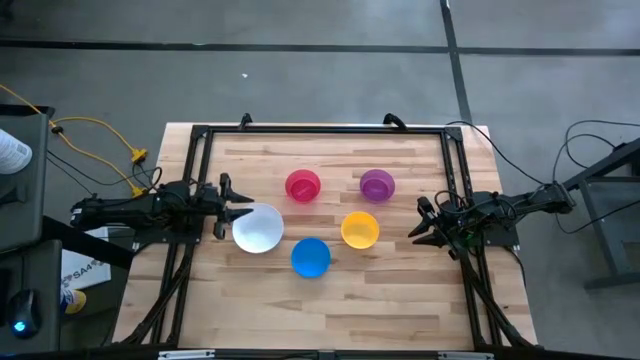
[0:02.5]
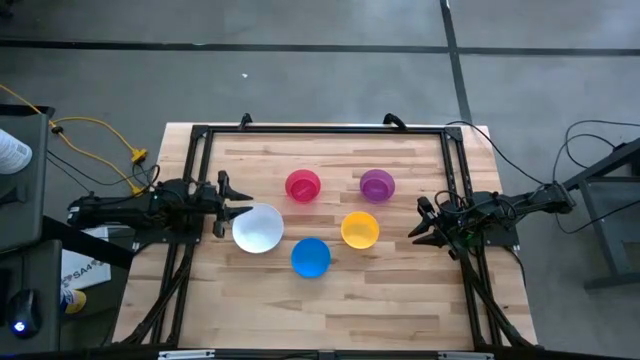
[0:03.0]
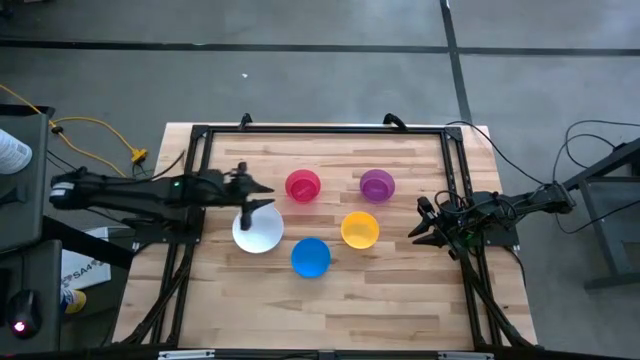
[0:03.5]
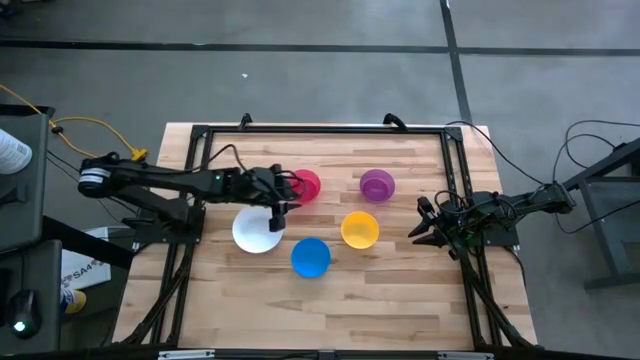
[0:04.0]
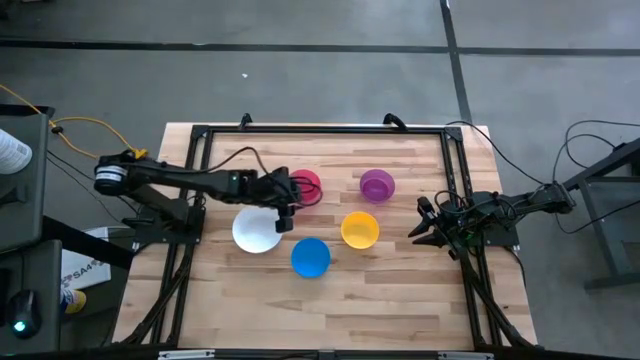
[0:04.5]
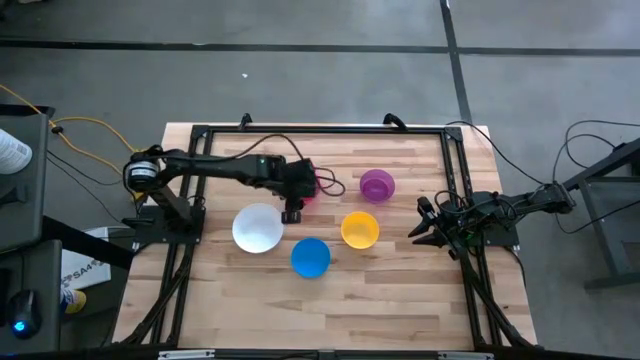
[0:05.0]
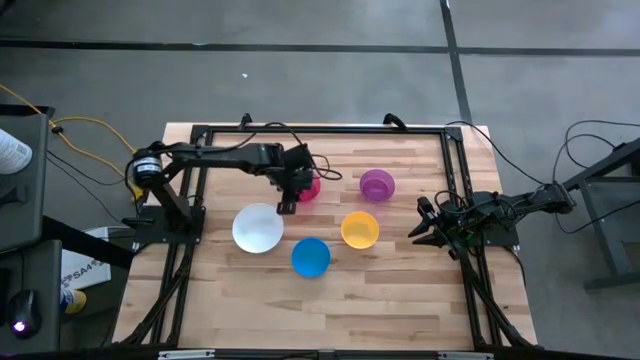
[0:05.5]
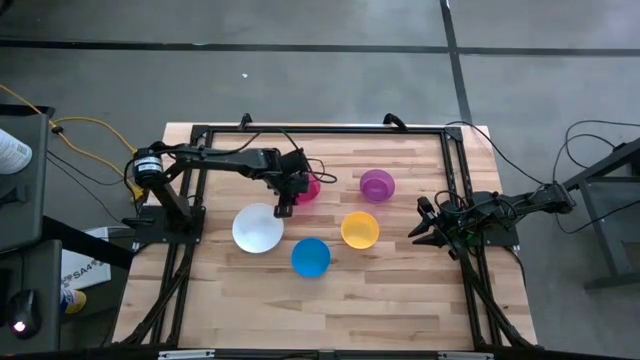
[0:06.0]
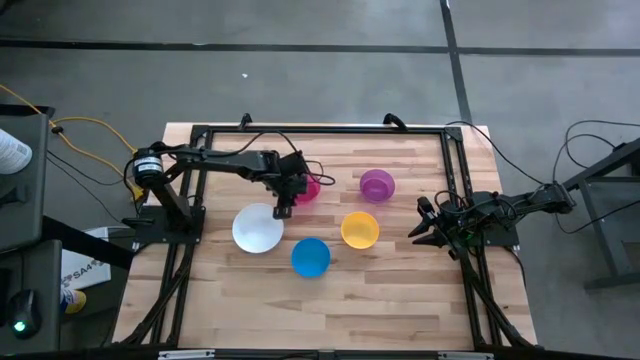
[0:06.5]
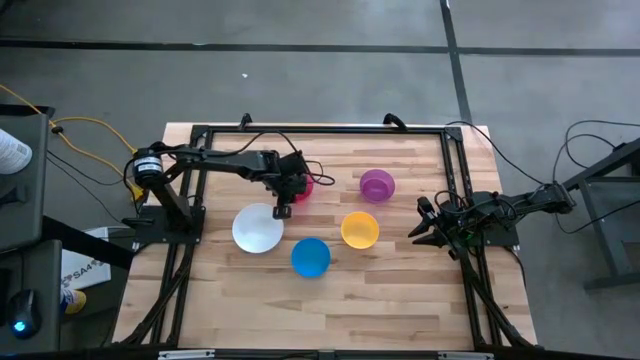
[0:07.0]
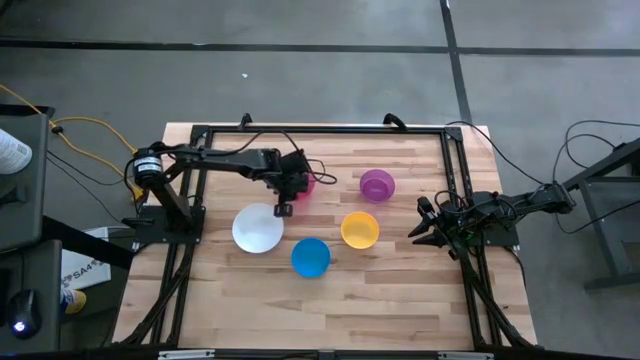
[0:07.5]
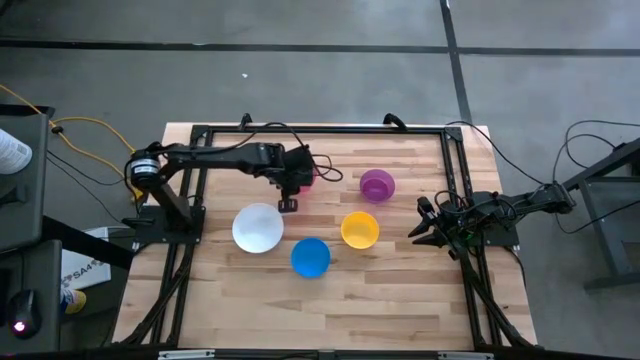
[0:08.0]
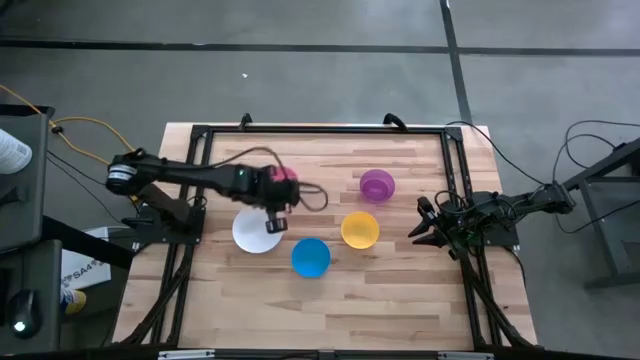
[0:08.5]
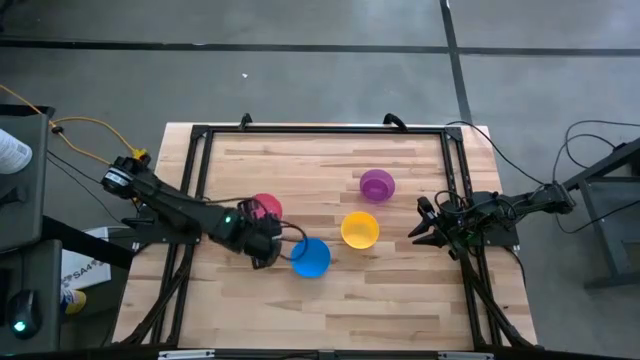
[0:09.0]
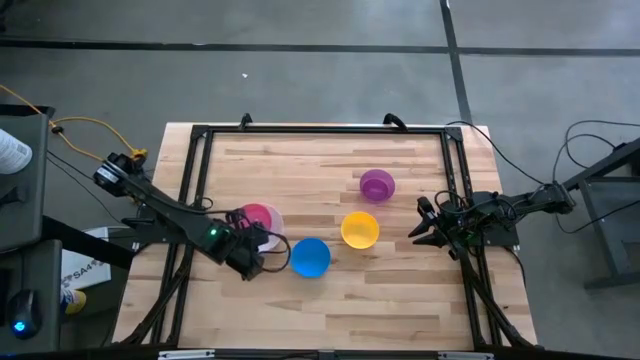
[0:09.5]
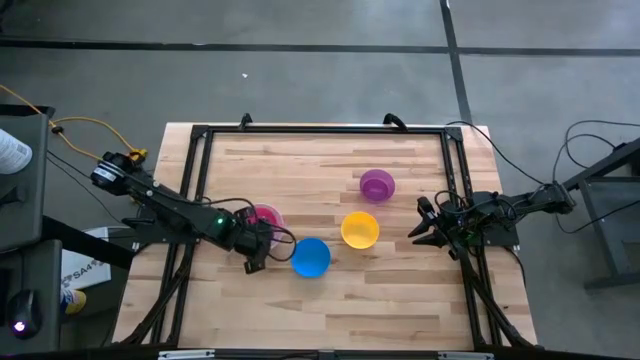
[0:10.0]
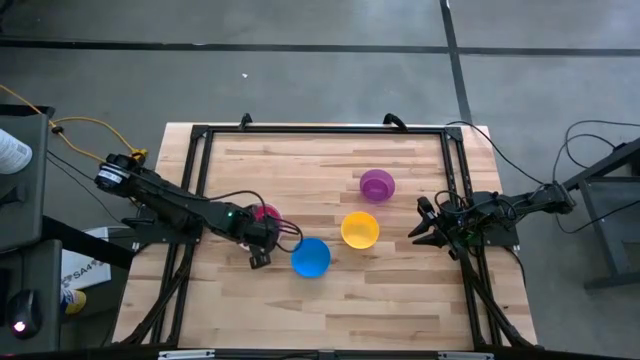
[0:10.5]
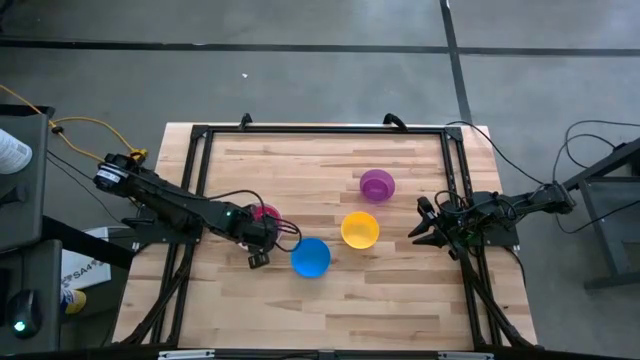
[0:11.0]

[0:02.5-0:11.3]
Stack the pink bowl on the white bowl

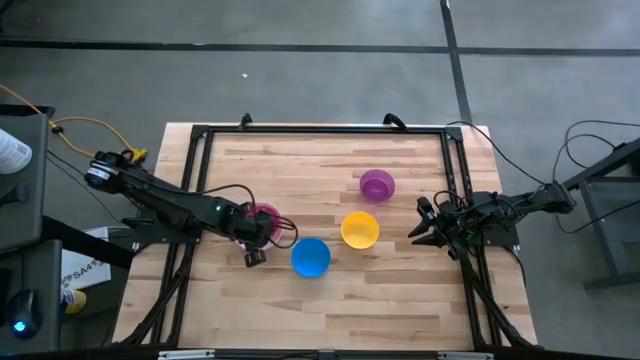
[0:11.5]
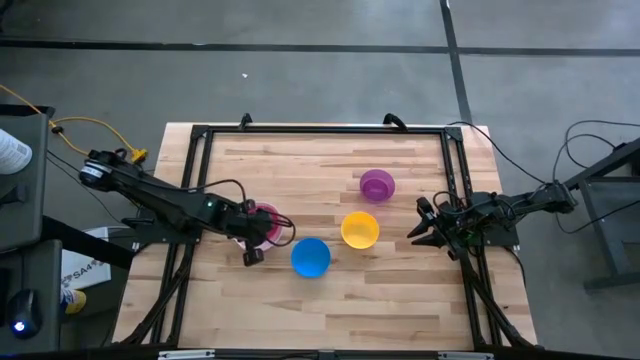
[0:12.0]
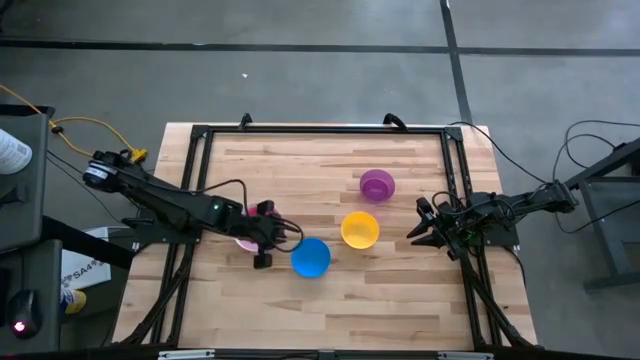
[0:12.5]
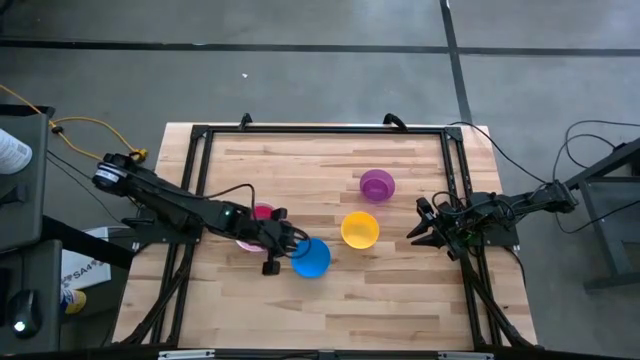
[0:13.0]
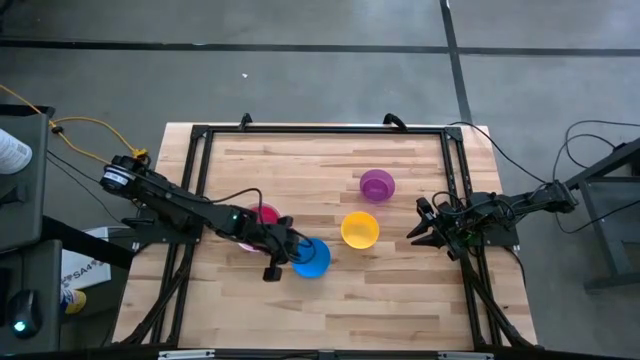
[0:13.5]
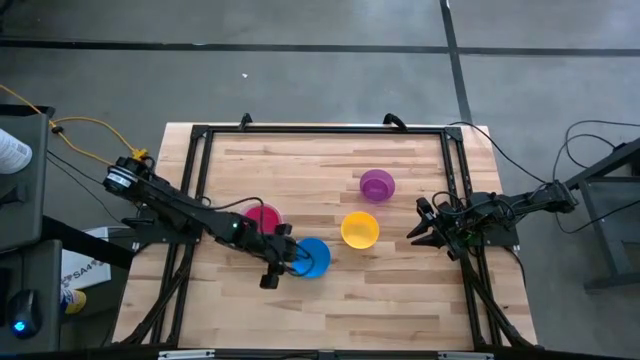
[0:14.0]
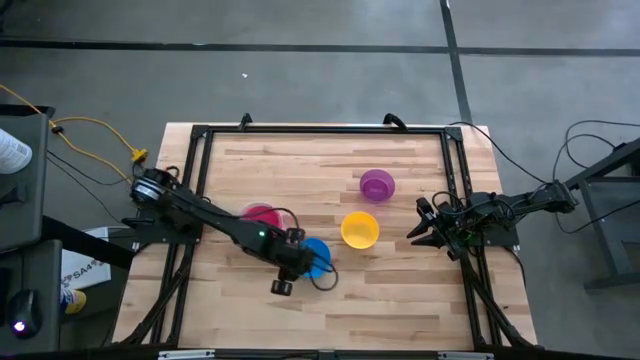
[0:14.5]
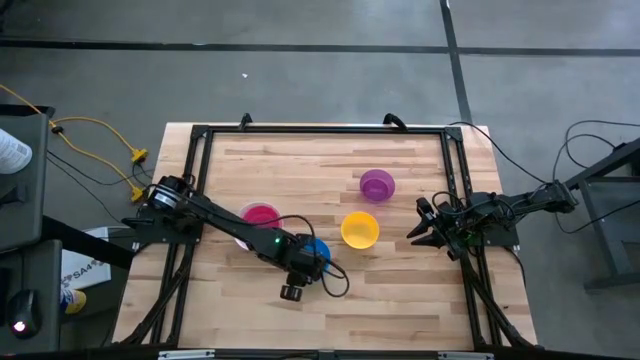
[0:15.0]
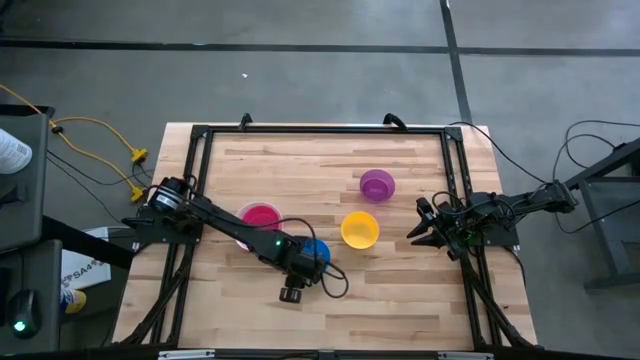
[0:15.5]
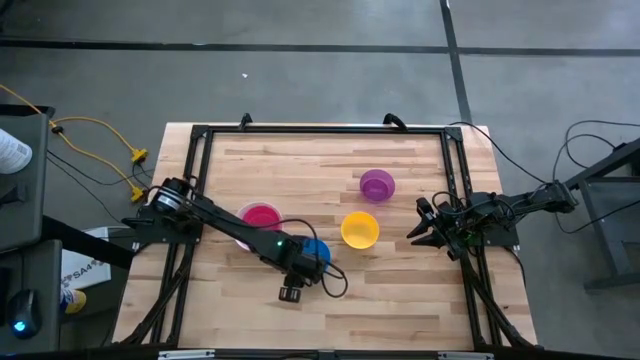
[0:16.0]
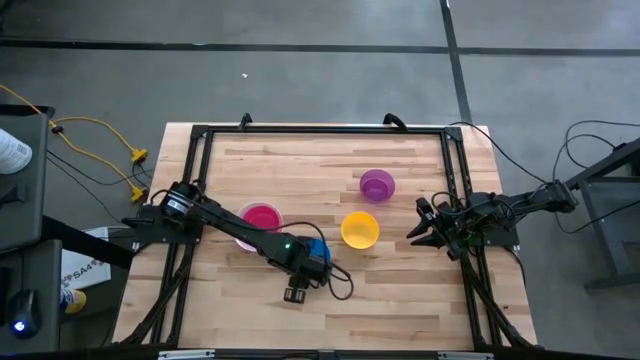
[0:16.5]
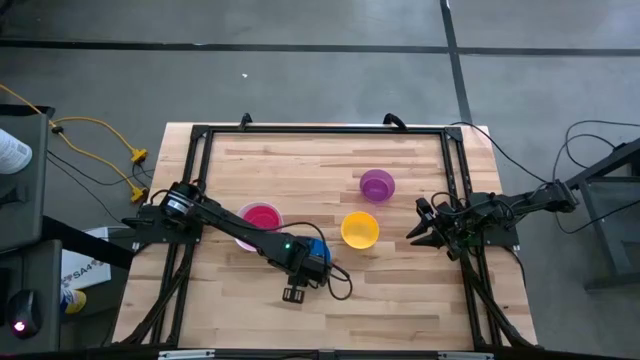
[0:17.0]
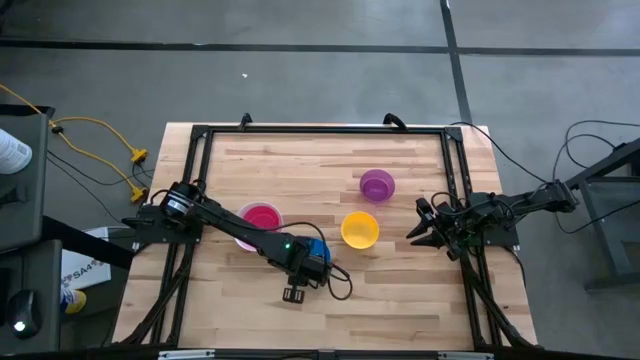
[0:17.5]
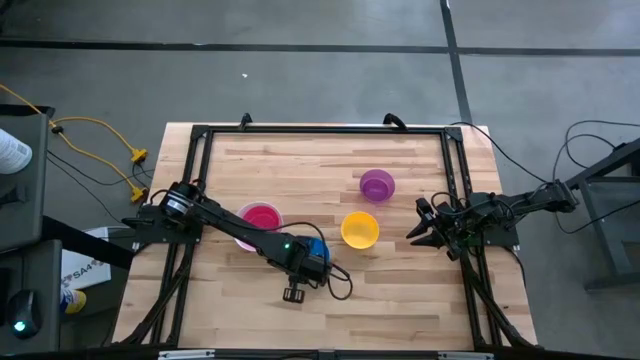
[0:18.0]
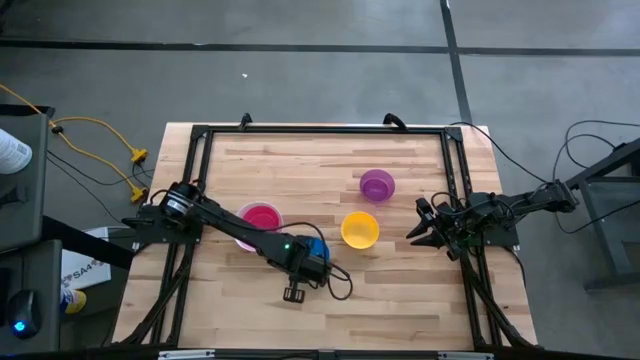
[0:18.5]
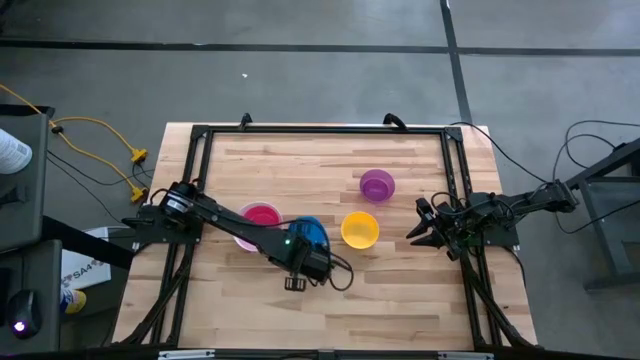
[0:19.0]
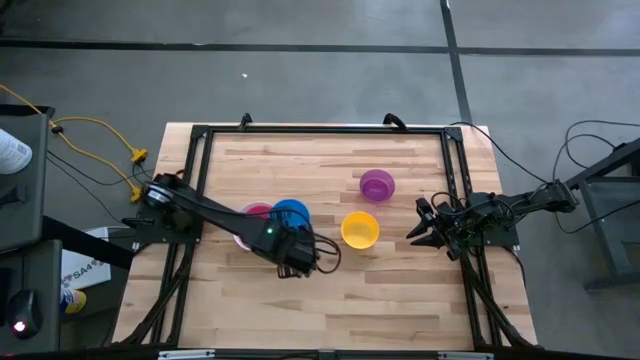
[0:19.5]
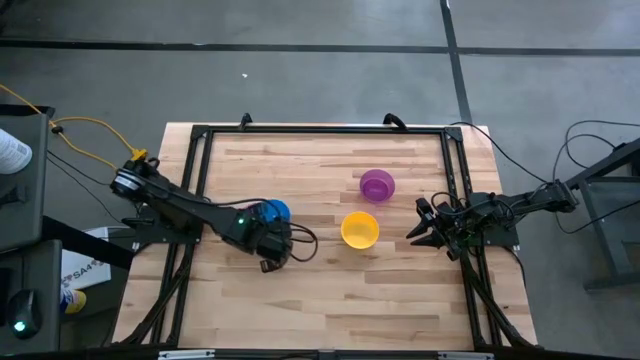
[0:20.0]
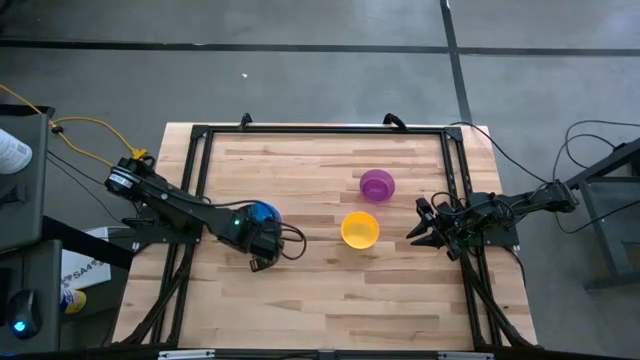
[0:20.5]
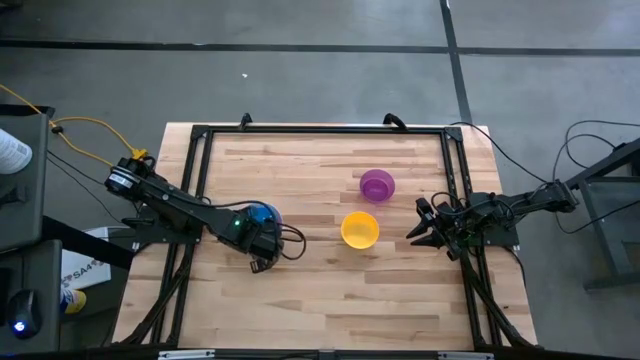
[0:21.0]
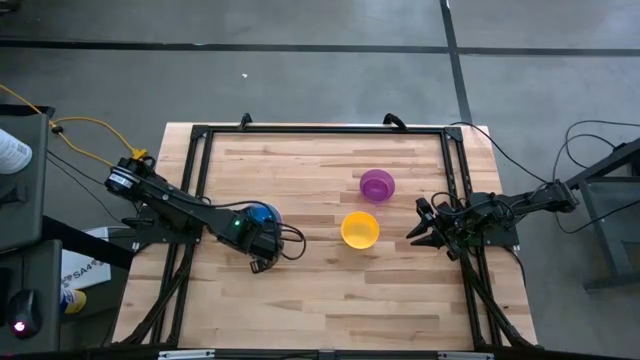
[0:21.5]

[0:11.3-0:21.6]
Stack the blue bowl on the pink bowl
